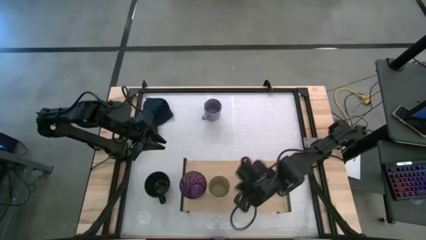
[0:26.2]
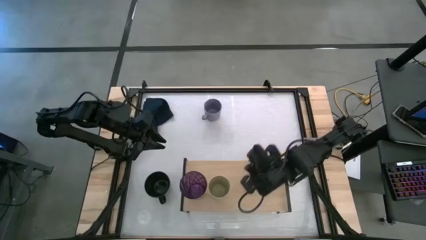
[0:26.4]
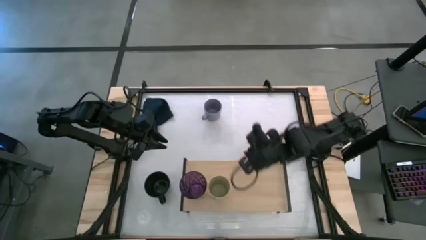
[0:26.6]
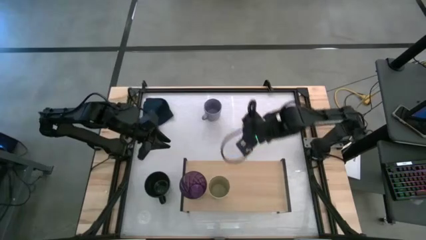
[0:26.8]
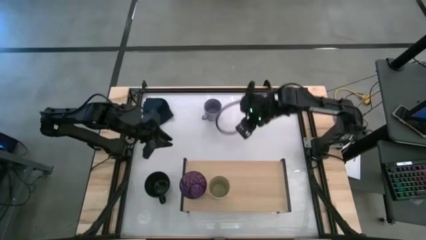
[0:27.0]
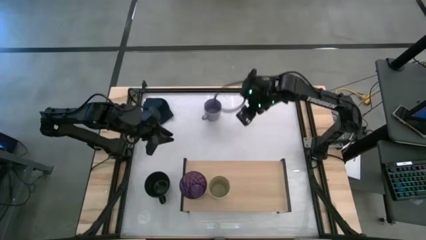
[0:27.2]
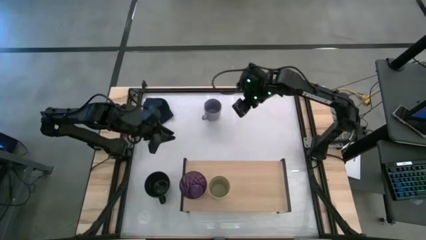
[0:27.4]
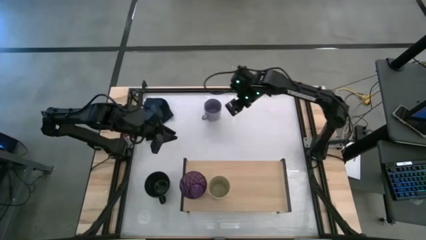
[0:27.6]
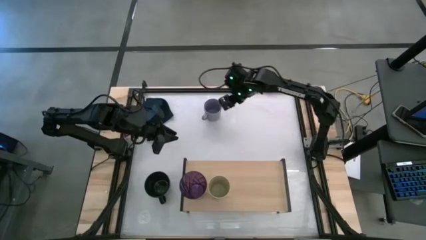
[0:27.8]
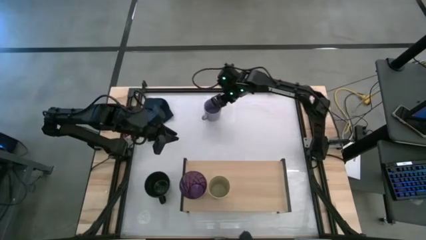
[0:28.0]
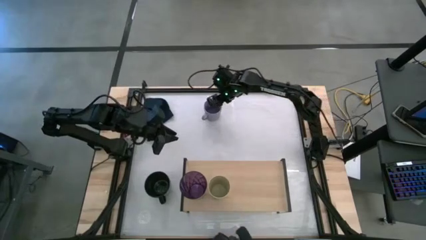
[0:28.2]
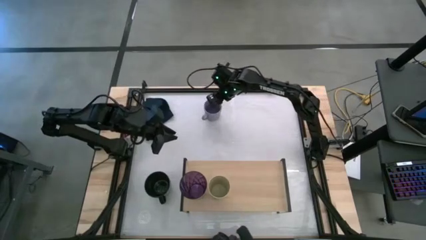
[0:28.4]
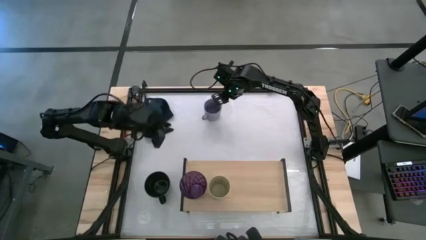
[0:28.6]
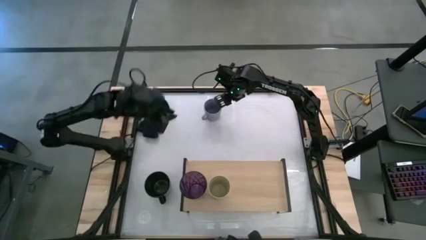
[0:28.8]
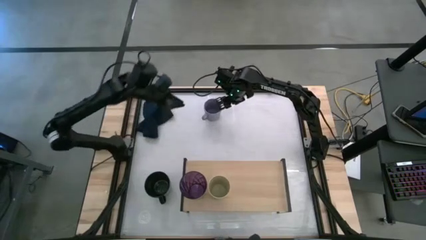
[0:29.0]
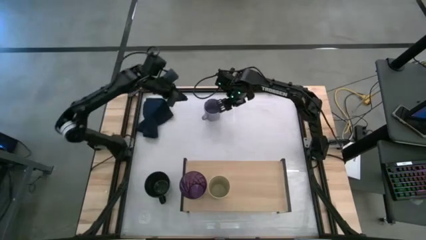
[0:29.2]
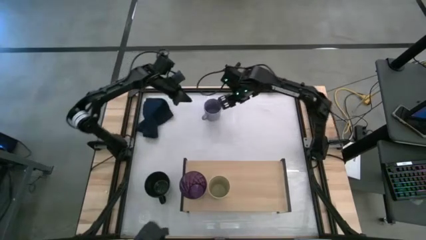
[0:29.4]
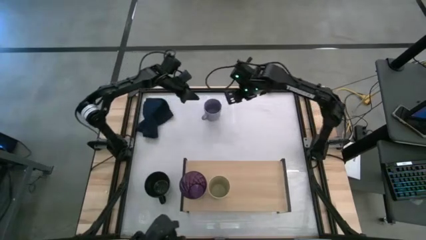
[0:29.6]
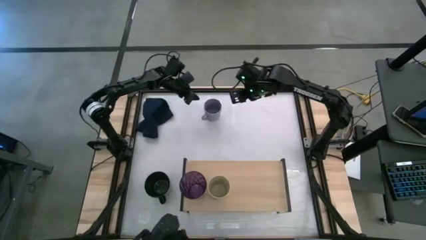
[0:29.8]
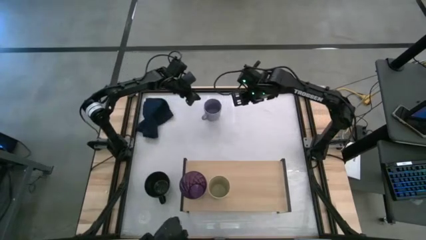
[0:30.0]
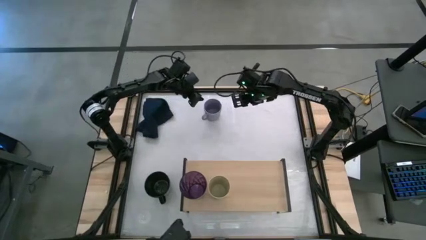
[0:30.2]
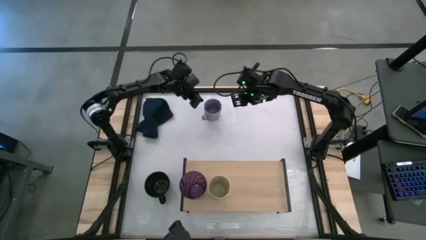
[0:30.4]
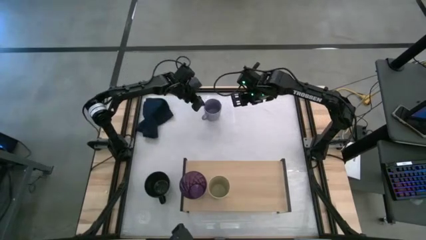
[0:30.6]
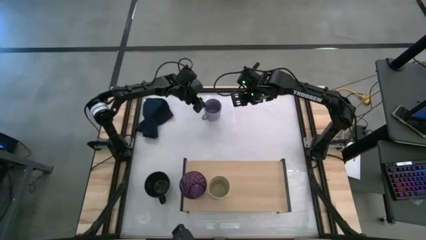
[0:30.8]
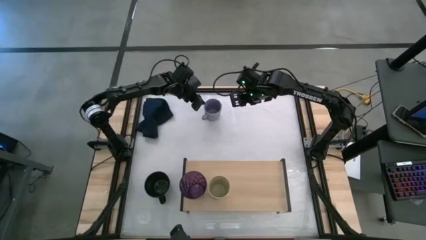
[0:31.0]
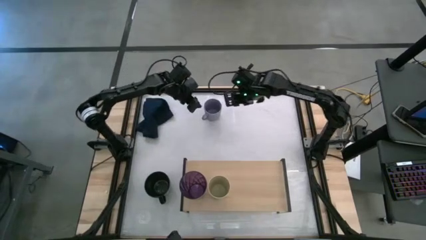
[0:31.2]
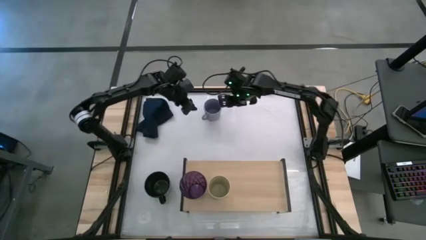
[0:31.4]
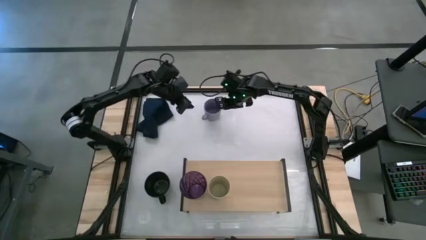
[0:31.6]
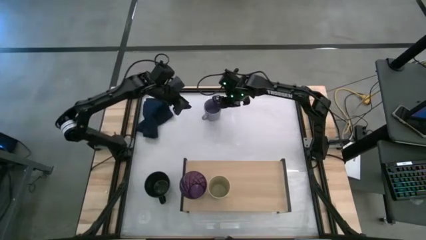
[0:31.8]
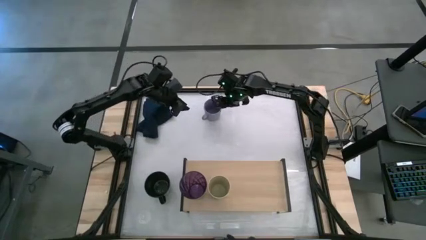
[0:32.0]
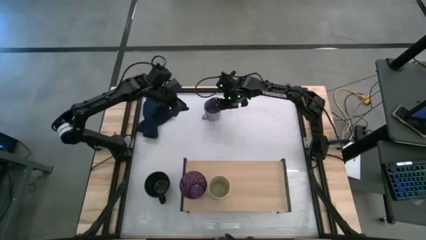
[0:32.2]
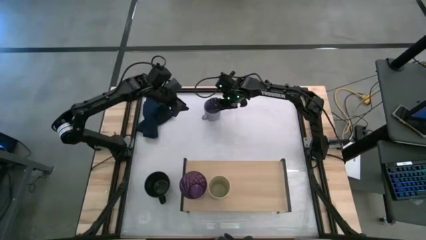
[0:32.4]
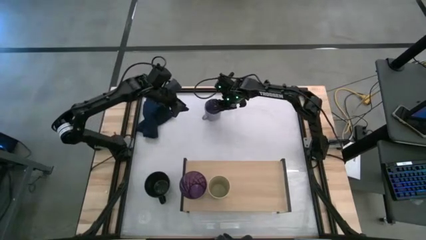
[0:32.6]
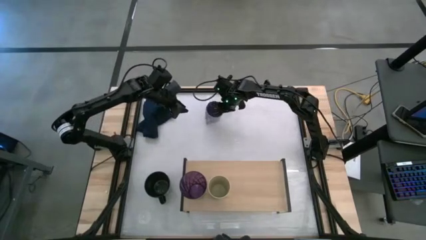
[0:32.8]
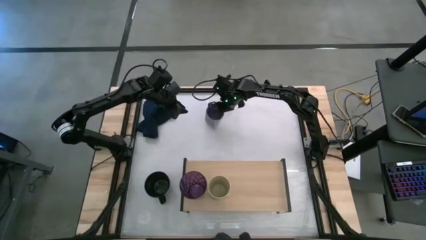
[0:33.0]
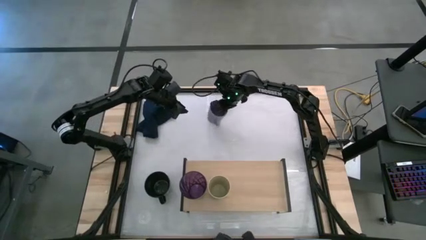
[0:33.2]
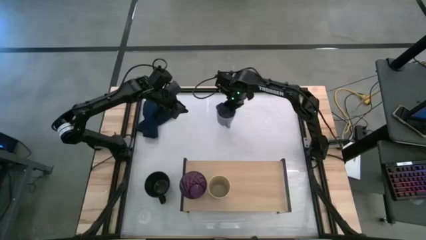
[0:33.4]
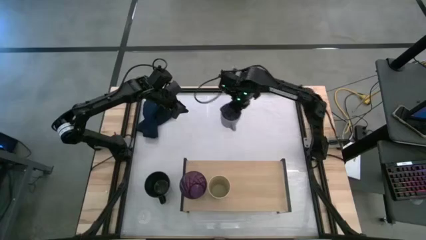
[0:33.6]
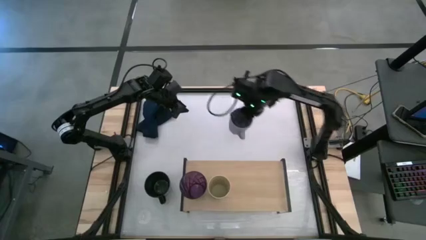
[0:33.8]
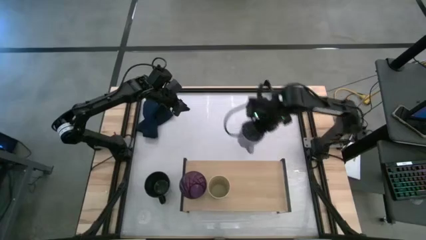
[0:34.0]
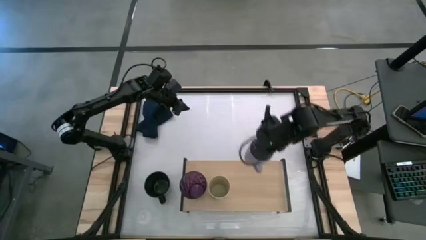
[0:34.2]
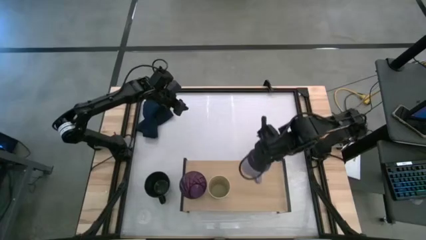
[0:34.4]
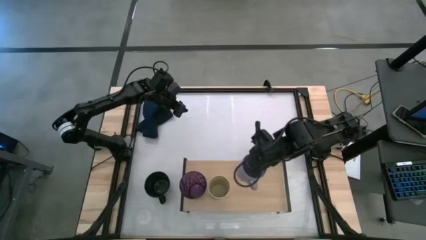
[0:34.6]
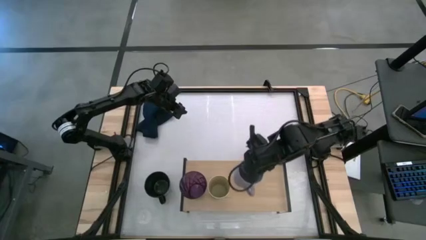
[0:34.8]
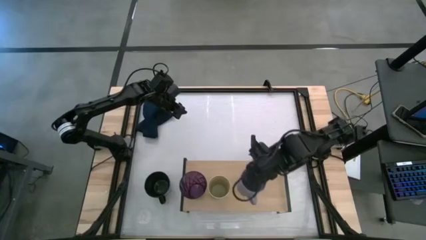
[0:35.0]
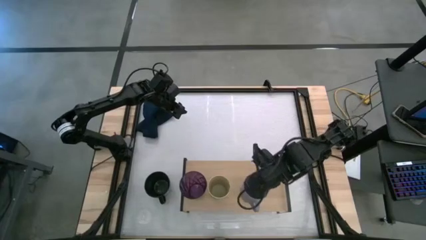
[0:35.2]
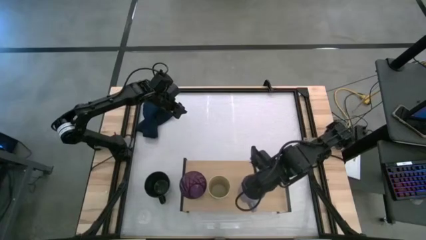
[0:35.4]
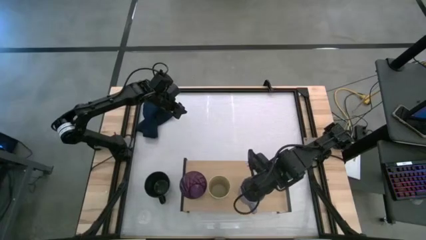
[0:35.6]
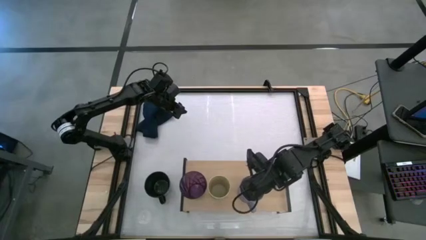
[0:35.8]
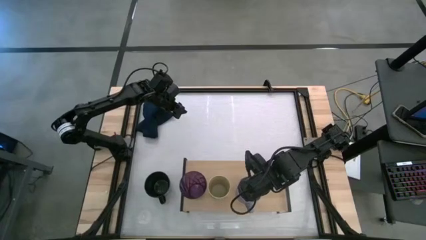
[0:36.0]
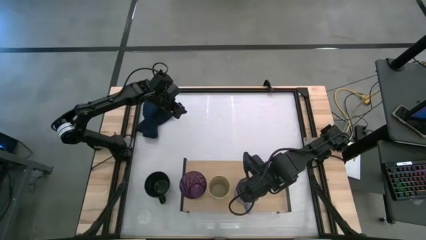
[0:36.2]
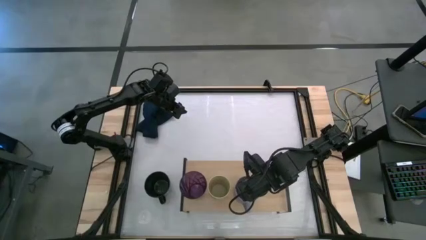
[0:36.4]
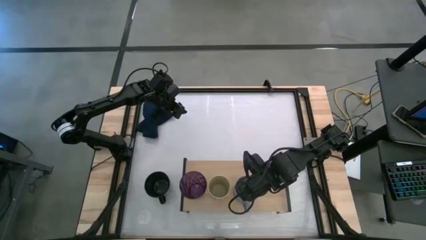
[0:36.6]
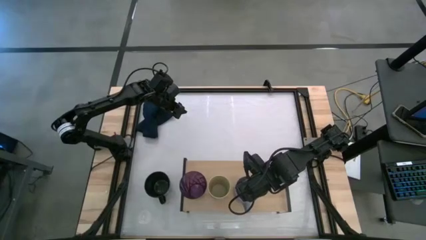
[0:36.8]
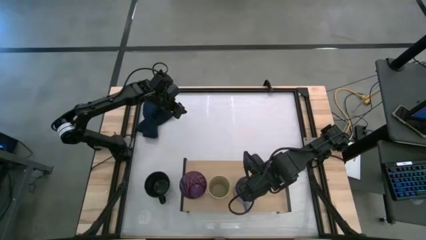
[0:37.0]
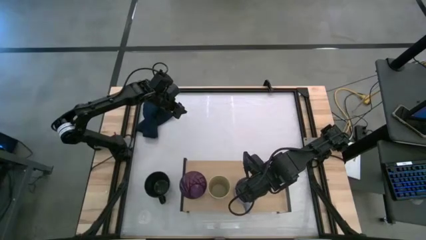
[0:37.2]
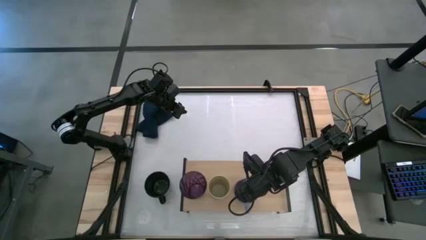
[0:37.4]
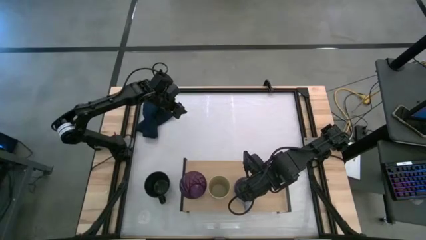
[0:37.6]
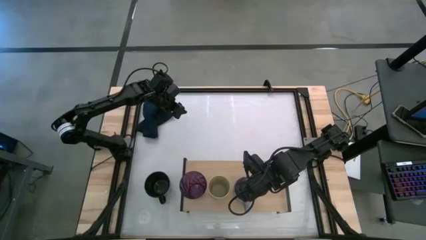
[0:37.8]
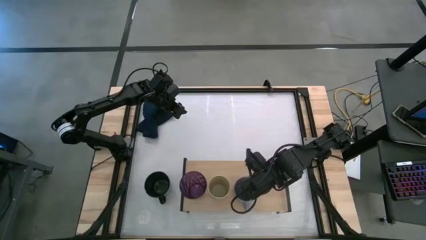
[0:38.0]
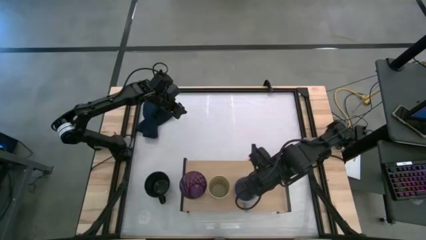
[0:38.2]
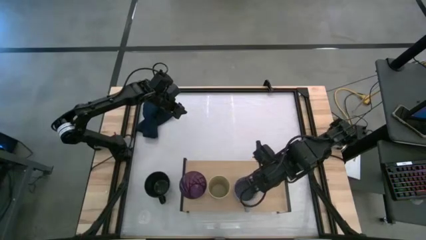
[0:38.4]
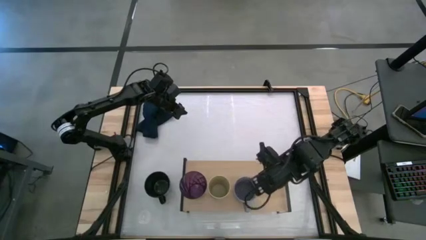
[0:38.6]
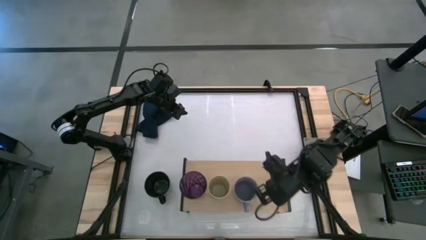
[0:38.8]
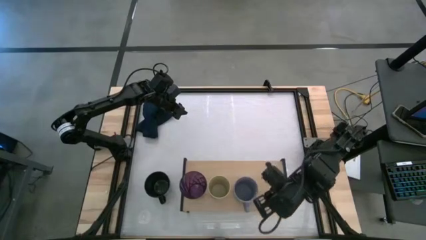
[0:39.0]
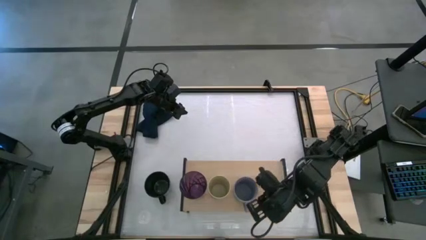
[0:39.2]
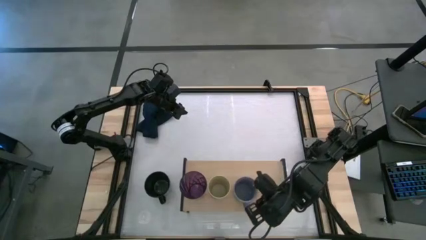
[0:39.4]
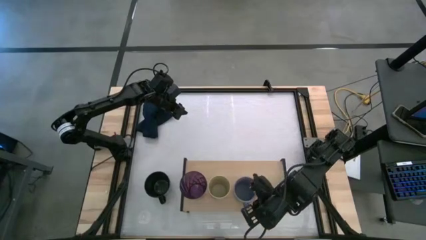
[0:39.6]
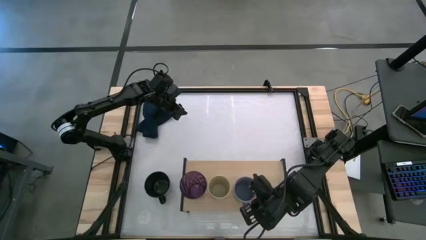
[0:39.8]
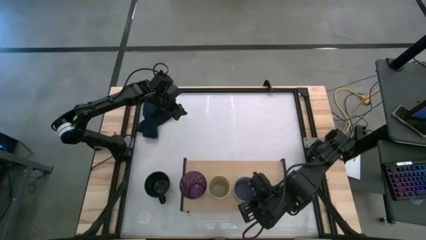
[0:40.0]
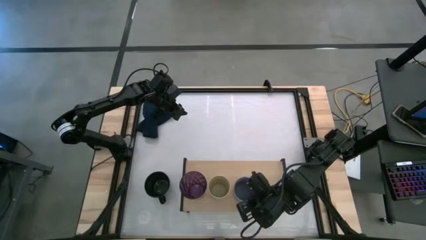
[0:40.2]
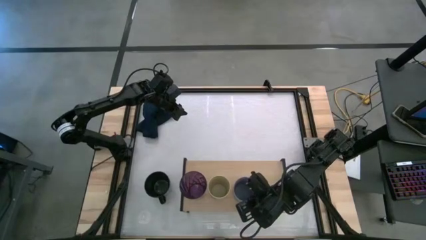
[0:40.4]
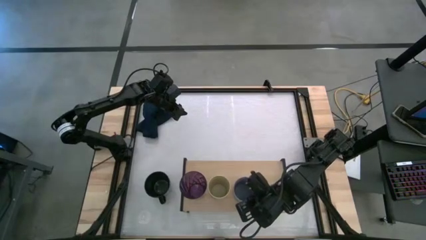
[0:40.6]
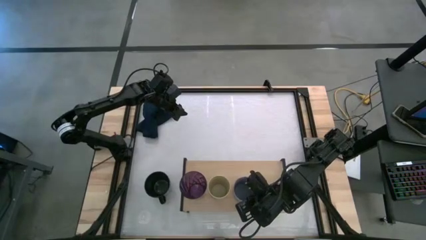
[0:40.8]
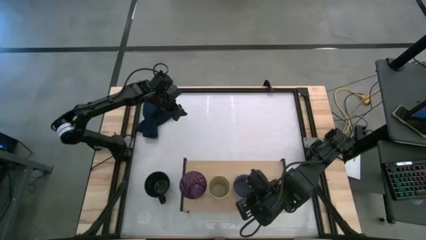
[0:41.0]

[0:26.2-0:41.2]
Task: Stack small to large cups/mugs on shelf
Put the gray mug on the shelf
